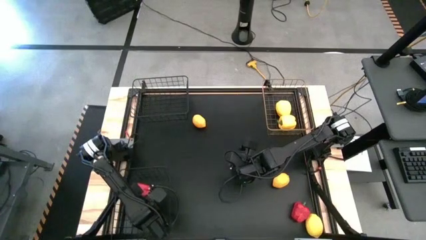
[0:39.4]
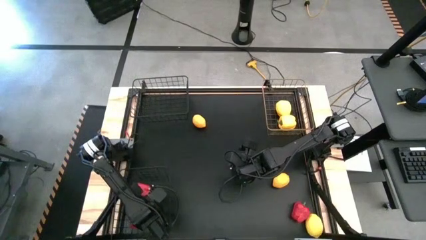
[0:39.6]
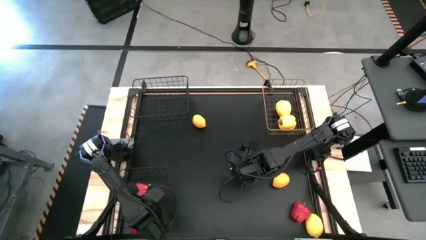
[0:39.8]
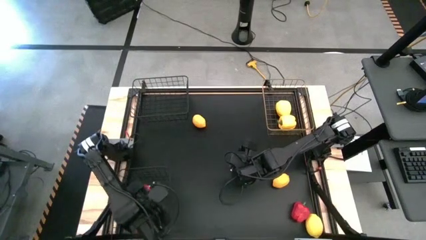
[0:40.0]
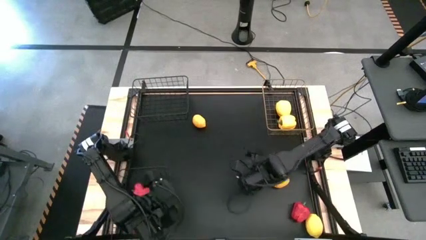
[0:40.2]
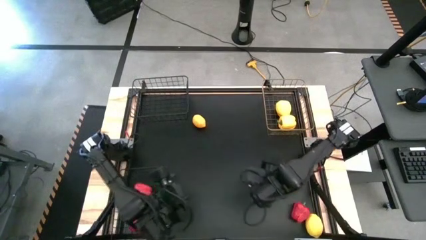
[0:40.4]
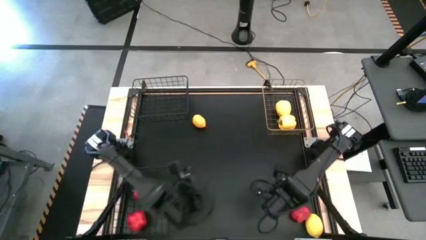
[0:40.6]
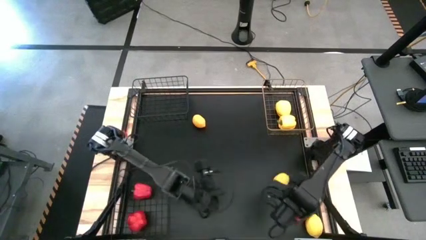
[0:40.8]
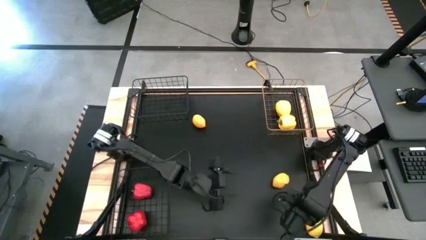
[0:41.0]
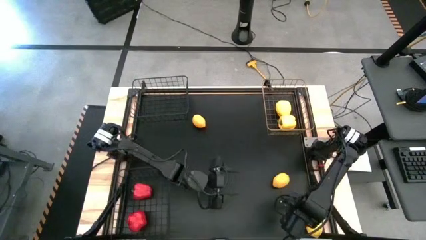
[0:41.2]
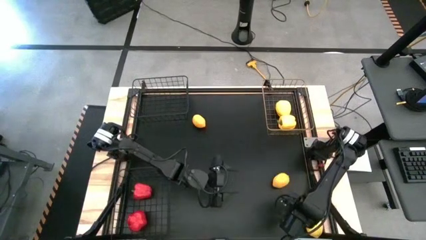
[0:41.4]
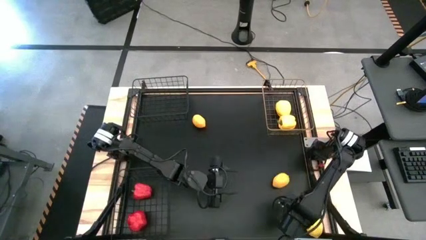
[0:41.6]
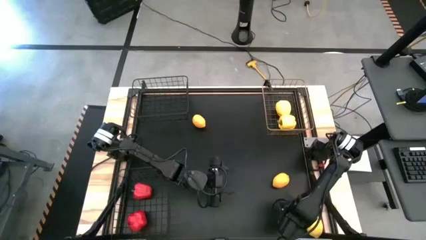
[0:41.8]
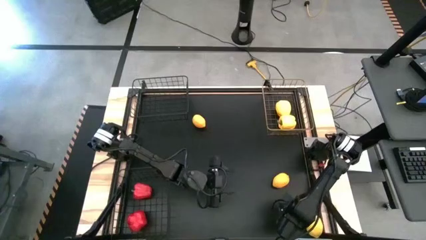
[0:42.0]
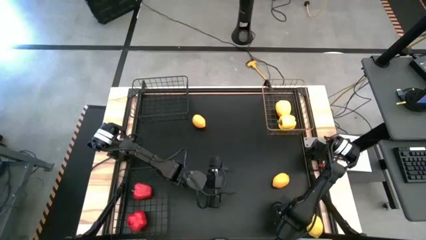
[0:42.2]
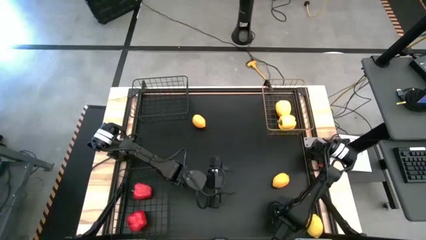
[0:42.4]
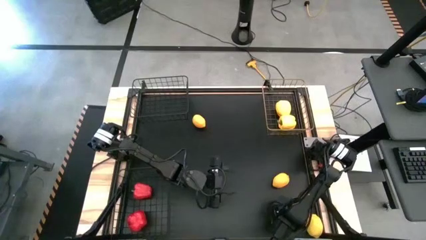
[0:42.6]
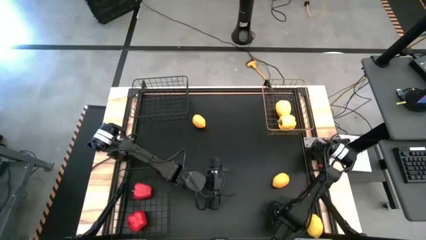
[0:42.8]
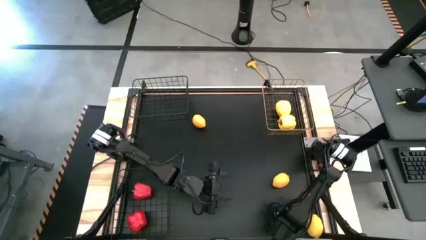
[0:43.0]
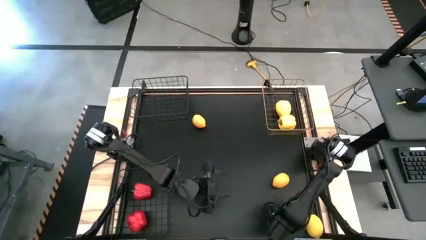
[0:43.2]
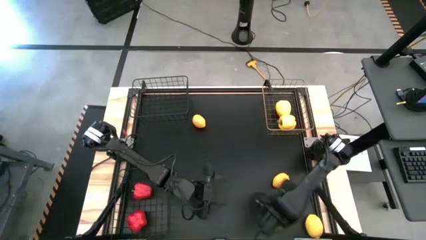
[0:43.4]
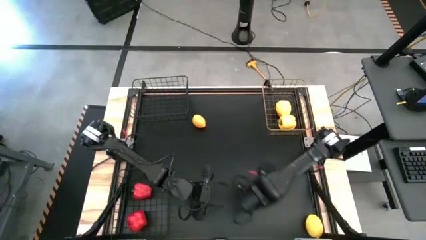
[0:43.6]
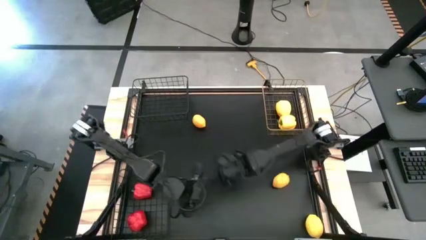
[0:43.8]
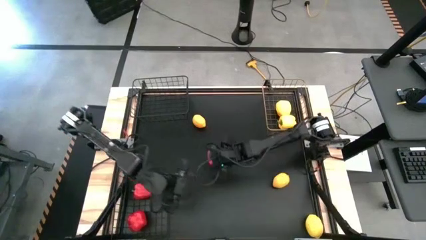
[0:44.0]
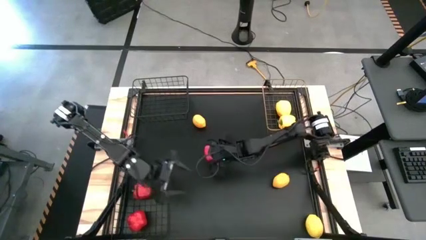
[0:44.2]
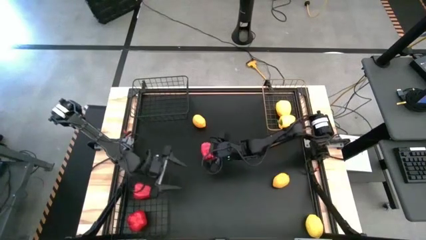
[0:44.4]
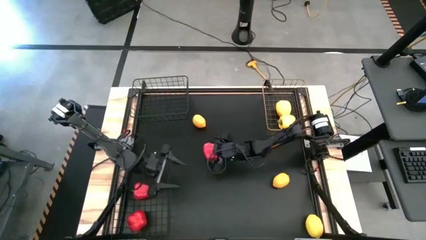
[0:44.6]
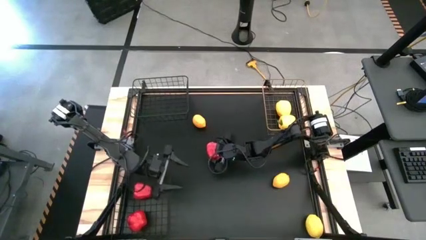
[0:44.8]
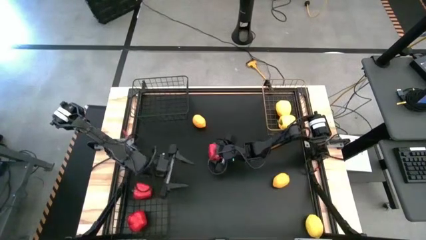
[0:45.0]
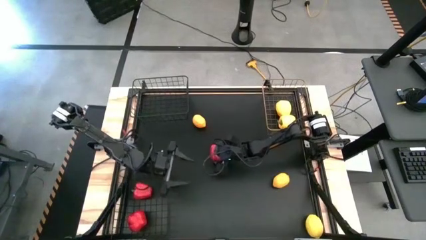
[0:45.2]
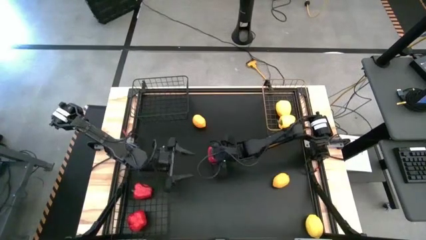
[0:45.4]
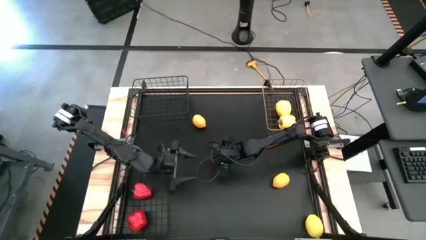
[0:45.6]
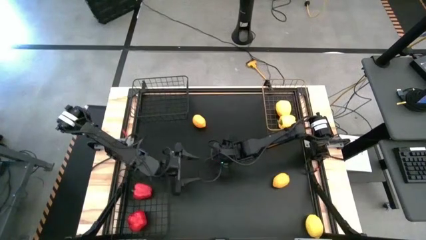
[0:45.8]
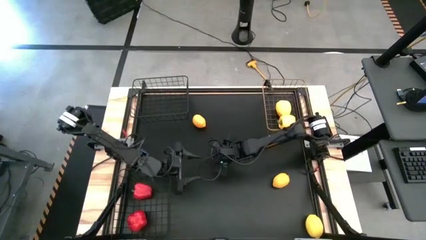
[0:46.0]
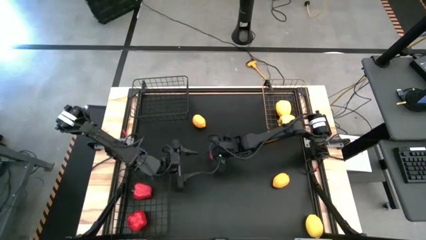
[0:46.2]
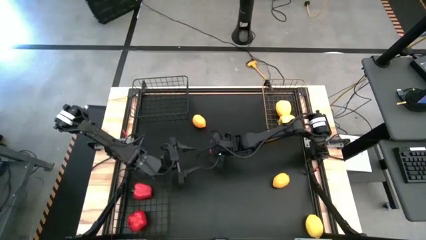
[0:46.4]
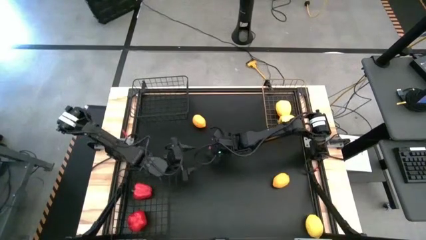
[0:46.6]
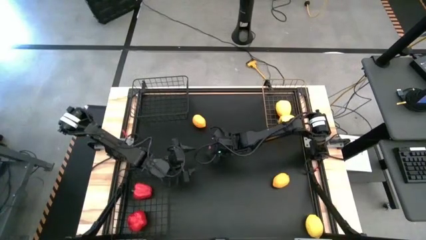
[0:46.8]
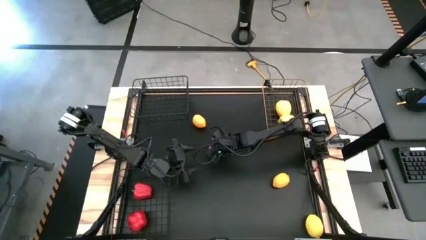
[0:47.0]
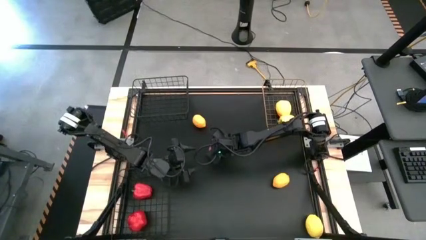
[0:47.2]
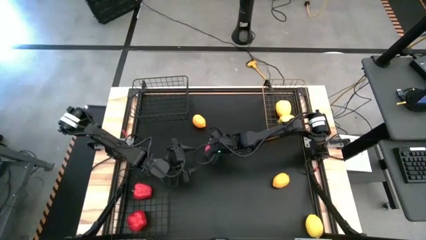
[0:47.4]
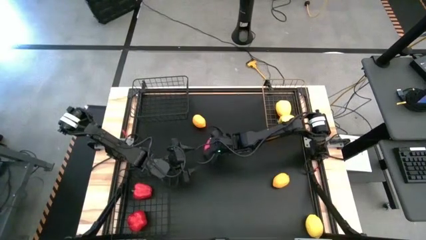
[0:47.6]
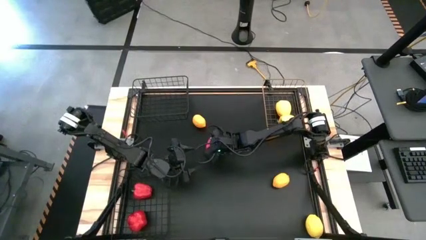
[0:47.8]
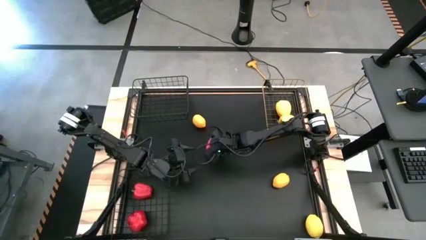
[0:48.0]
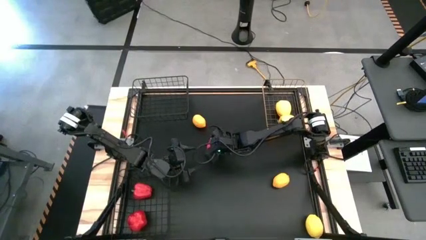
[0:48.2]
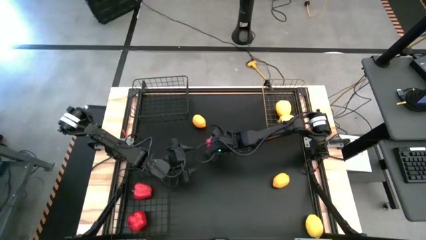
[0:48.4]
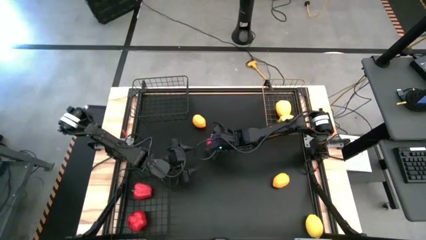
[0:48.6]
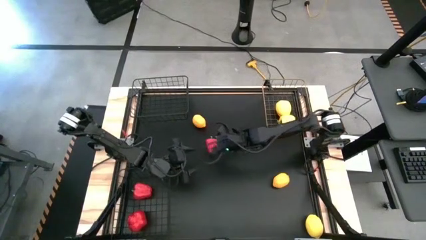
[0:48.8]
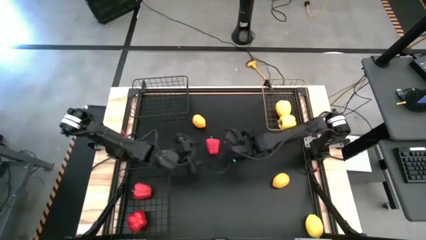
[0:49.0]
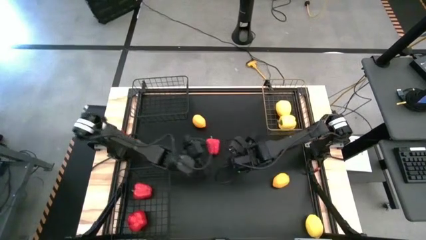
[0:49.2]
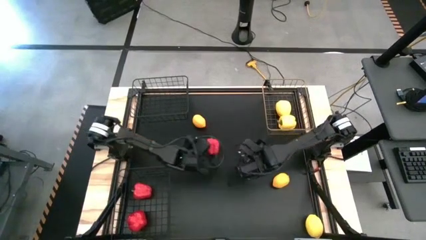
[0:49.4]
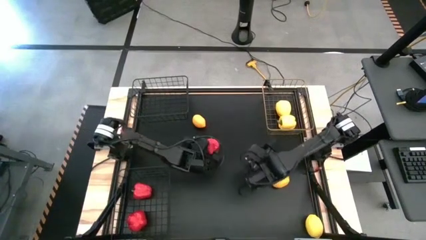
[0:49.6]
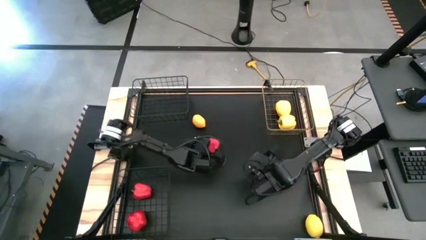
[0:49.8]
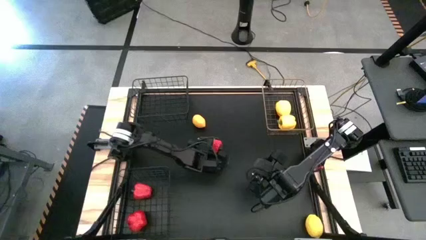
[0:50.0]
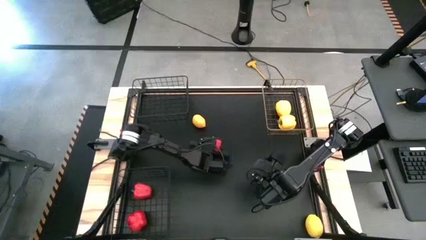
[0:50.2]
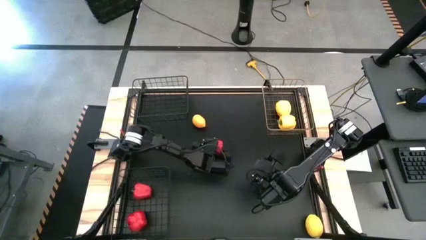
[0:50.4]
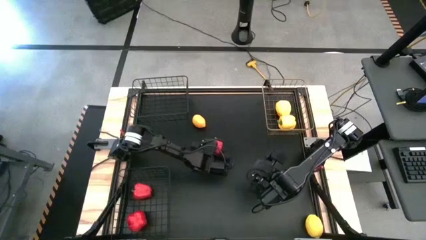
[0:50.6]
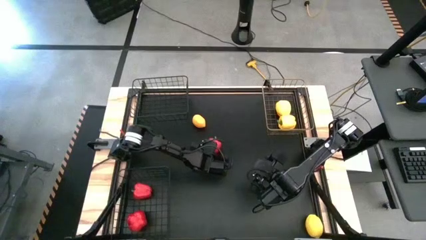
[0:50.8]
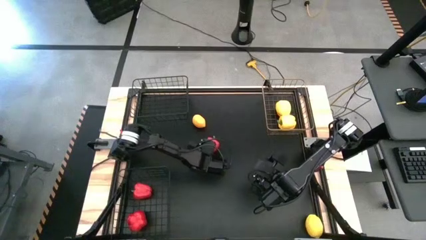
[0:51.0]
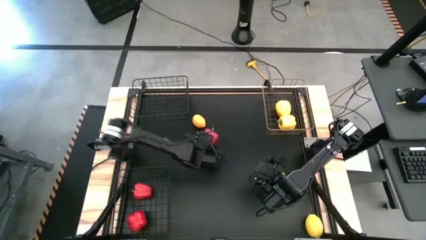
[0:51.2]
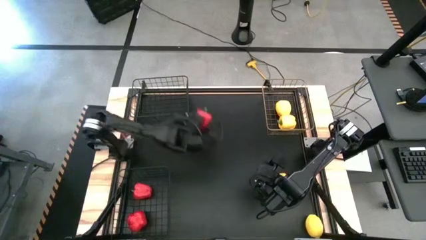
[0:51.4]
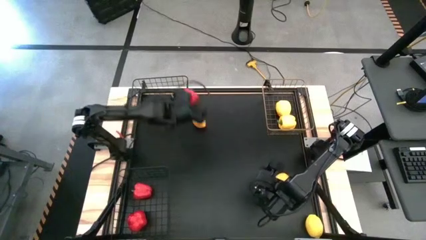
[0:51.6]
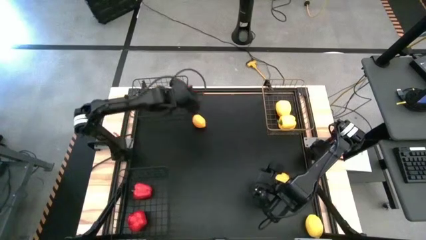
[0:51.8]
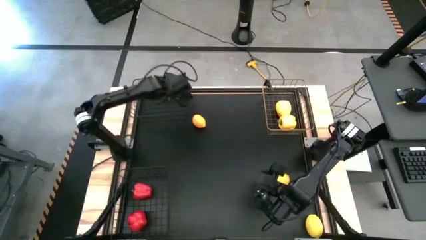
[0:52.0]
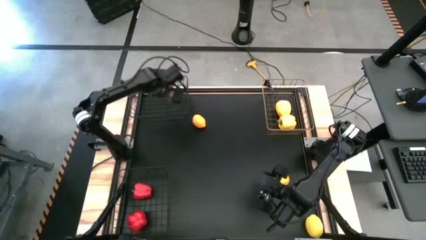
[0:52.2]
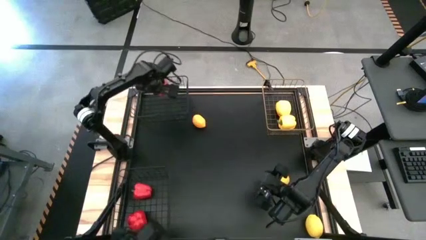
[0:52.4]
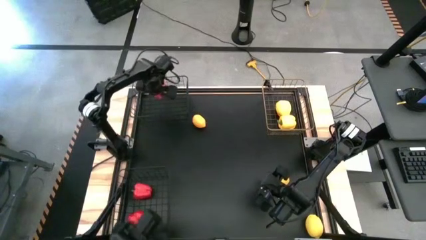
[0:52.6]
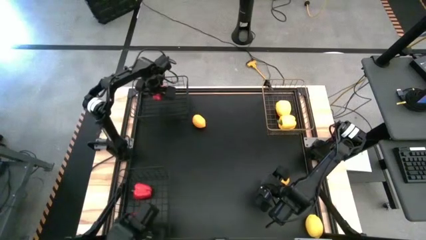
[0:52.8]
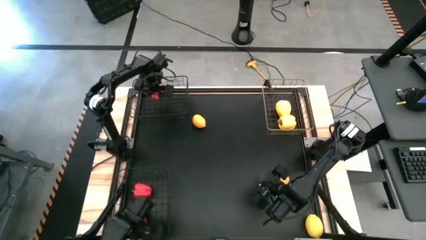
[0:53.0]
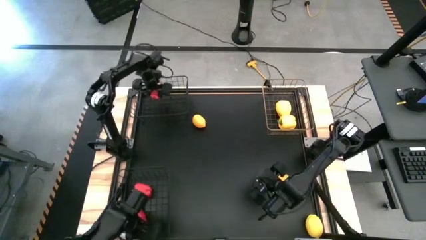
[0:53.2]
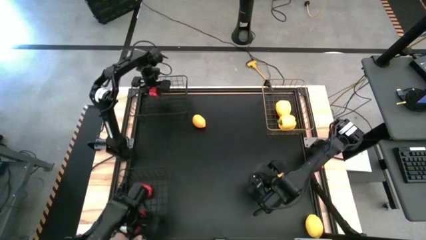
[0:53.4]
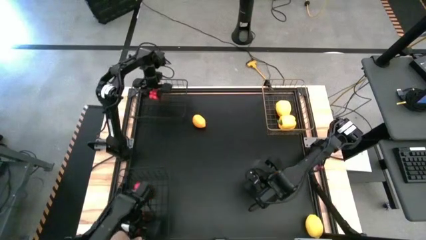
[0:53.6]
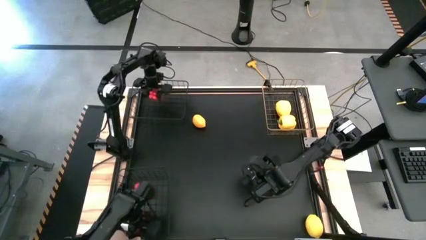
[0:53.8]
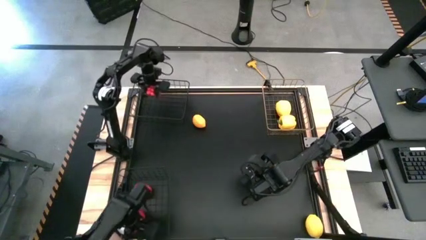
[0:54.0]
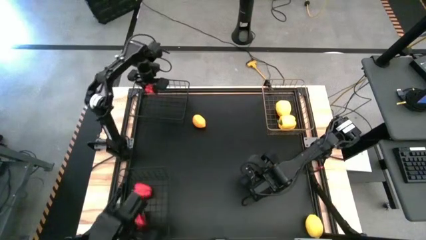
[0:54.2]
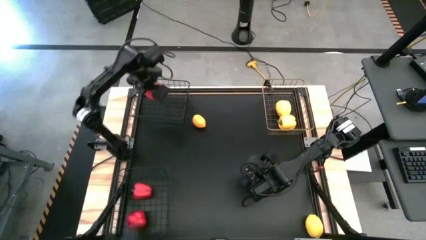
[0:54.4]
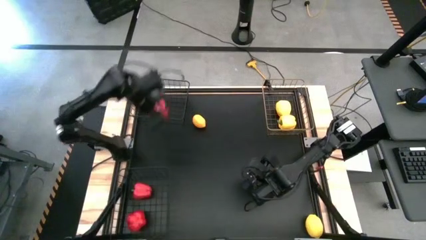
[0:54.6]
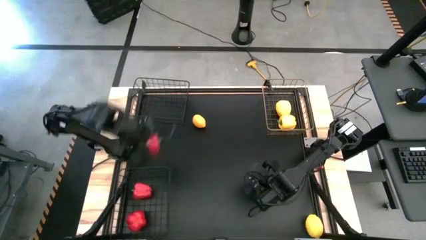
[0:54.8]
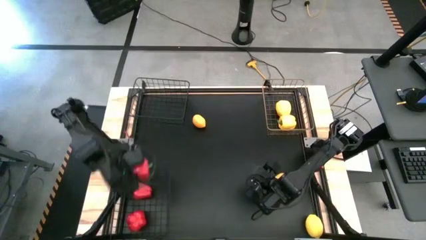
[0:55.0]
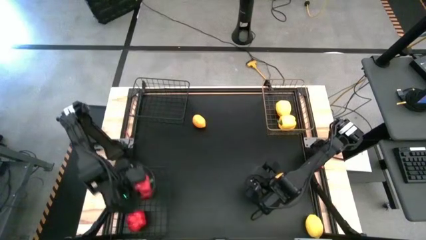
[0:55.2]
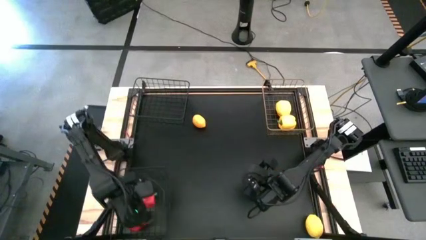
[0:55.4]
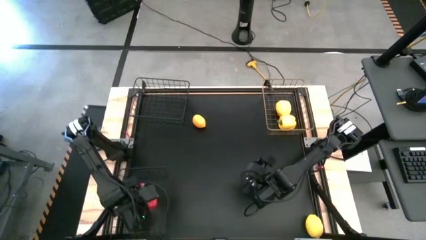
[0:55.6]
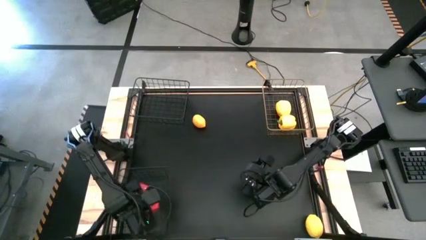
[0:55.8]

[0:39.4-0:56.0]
Task: Sort produce into baskets
Put the red bell pepper into the bottom black wire basket
